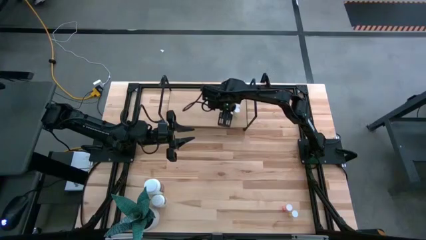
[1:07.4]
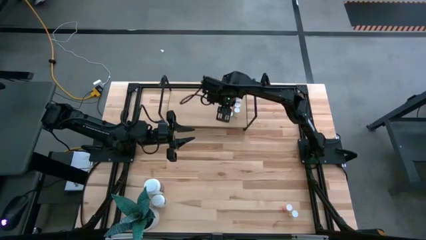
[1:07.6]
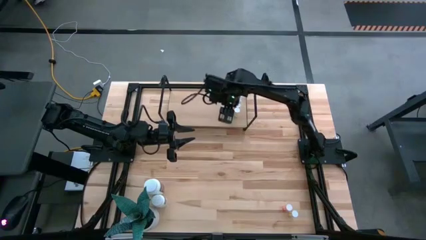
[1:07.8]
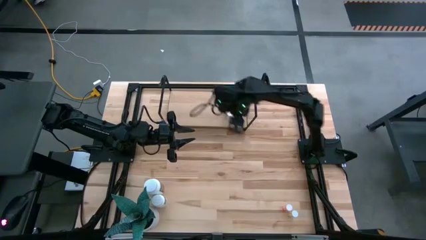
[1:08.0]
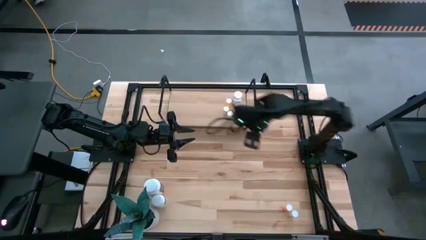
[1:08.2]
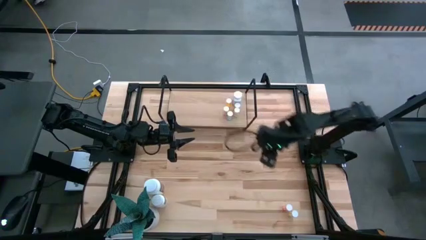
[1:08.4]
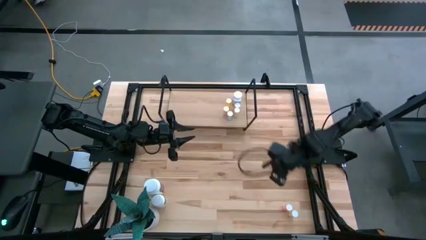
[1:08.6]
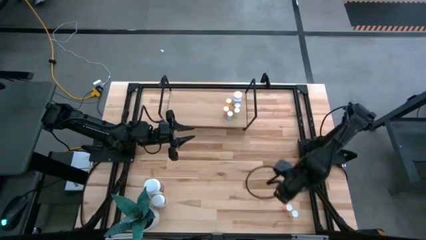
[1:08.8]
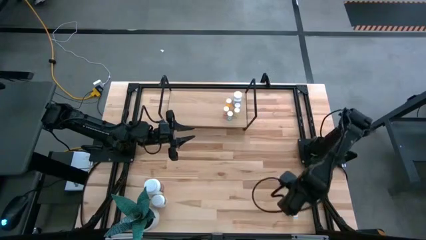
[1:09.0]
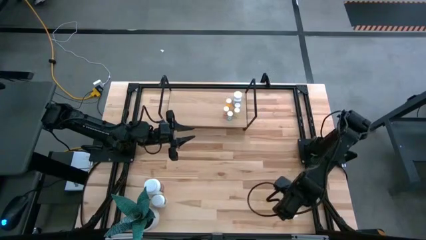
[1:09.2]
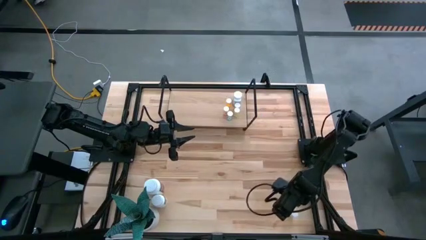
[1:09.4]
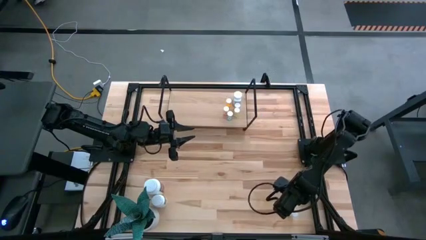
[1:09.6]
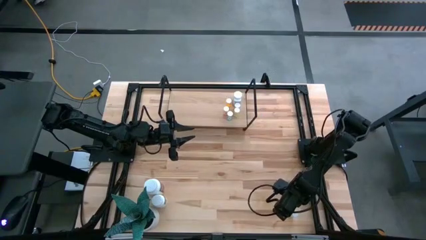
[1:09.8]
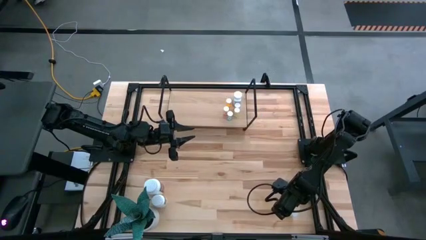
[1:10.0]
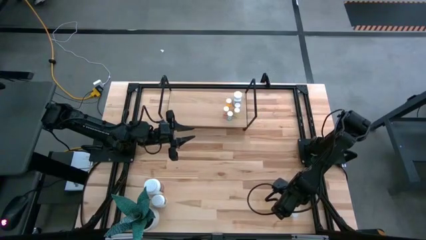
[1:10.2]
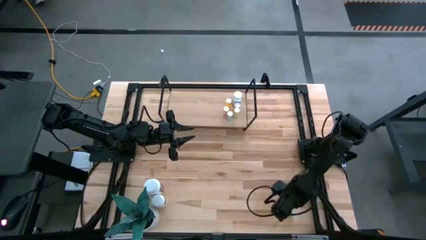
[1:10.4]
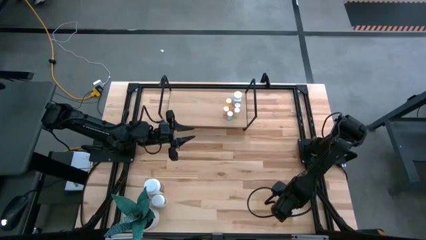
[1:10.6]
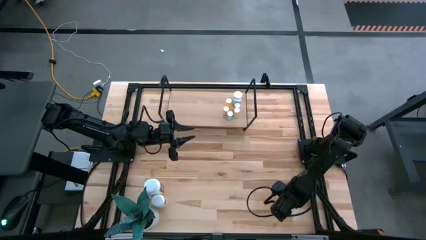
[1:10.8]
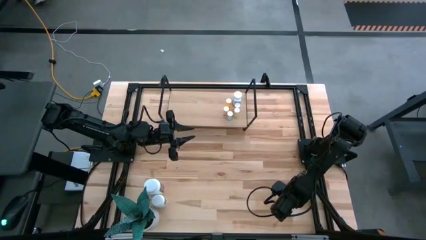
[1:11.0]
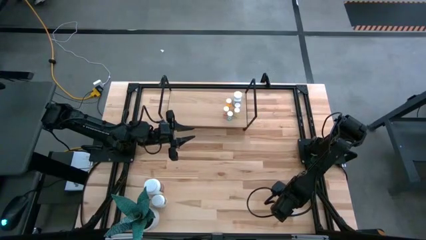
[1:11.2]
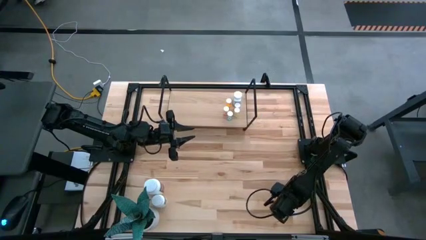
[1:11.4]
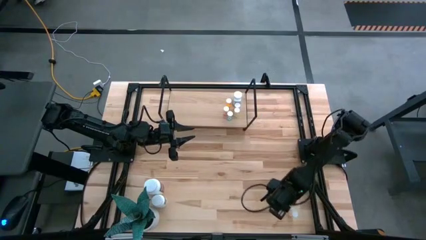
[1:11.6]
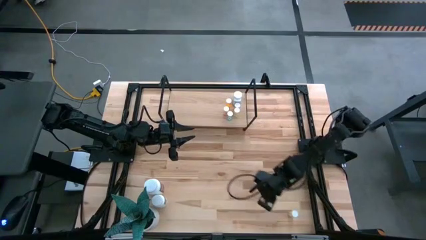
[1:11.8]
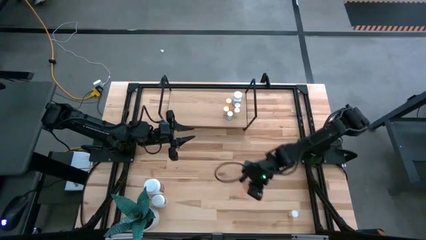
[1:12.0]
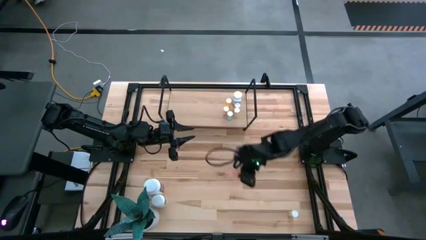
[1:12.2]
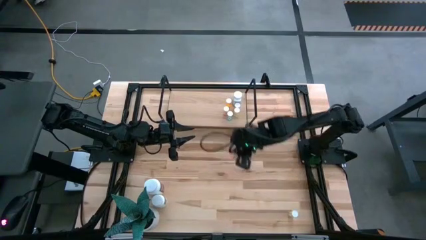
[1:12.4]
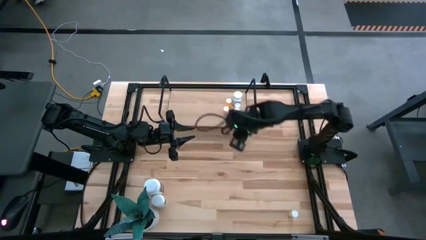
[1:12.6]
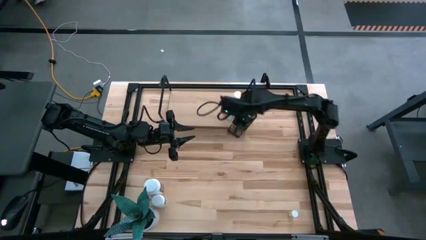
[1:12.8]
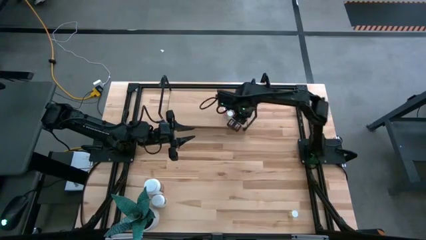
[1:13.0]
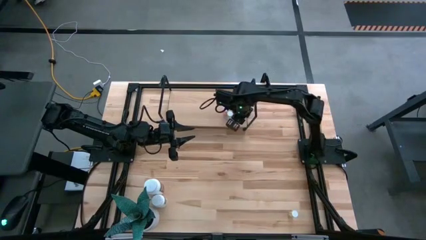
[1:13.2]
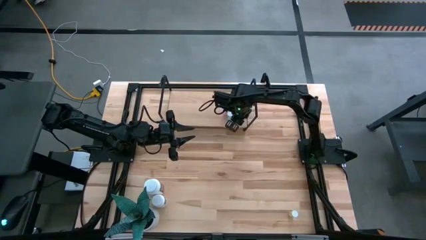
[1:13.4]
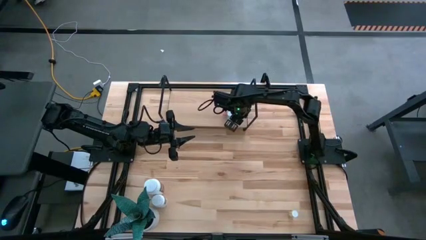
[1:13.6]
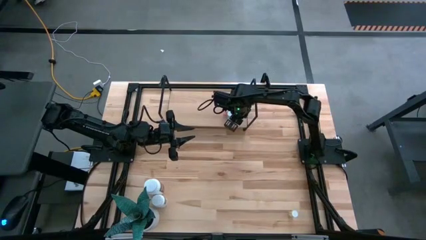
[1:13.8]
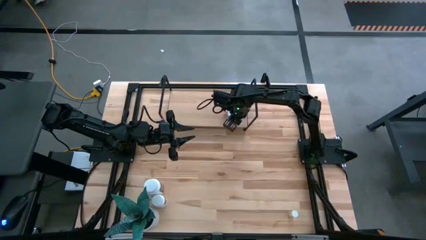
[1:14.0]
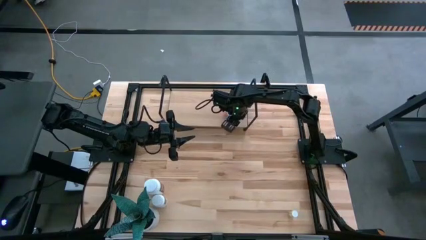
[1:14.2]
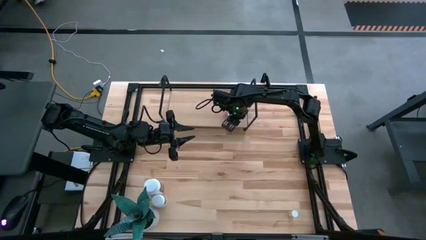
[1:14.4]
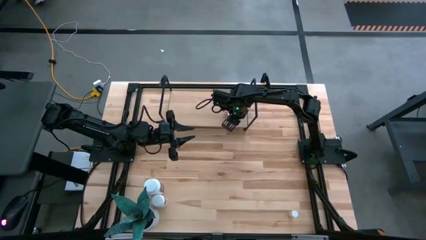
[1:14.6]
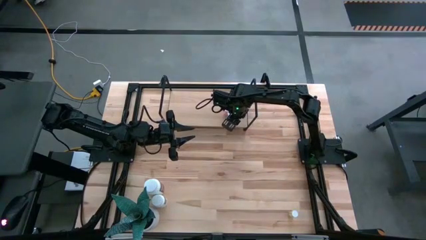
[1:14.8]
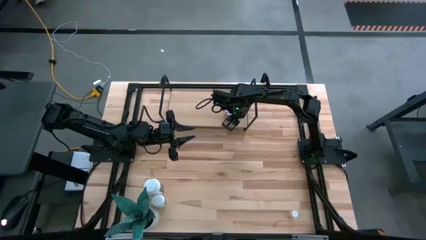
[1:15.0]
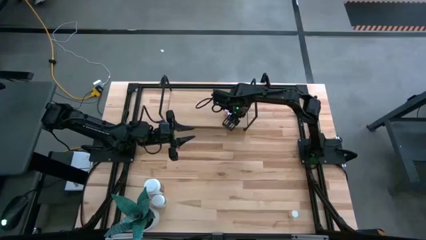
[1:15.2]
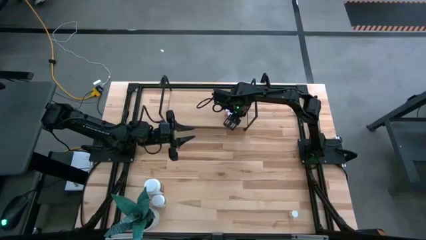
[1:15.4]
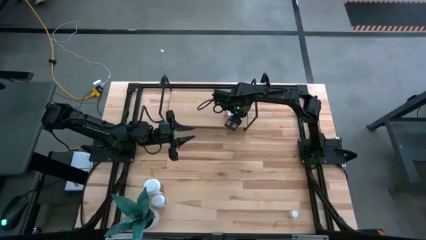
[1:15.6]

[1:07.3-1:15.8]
Task: Pick and place medicine bottles onto shelf by color
Put the pink pill bottle on the shelf

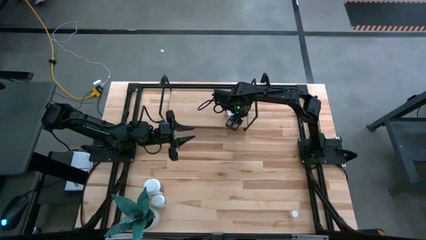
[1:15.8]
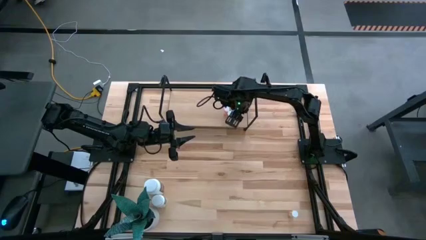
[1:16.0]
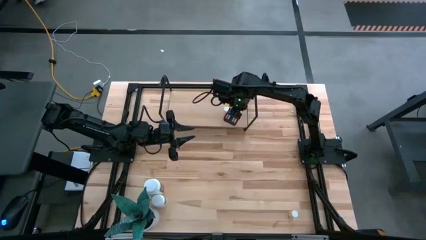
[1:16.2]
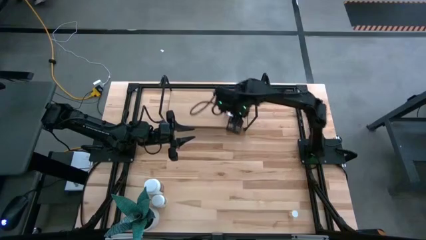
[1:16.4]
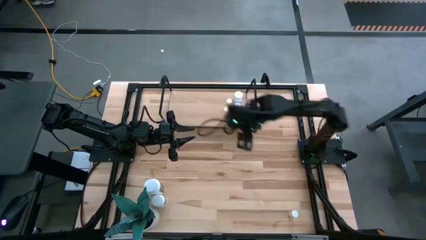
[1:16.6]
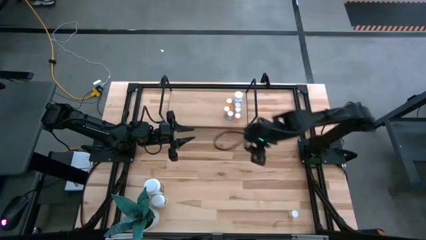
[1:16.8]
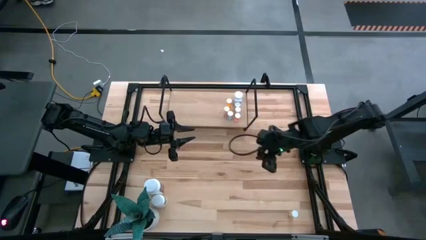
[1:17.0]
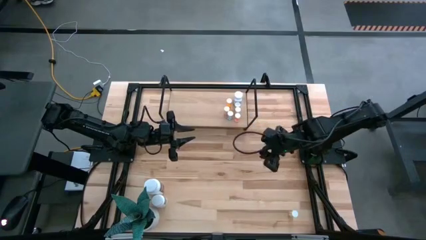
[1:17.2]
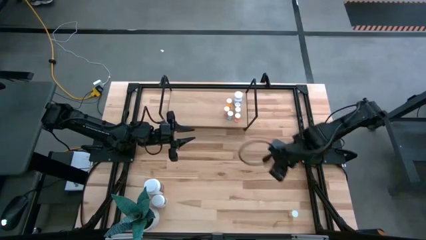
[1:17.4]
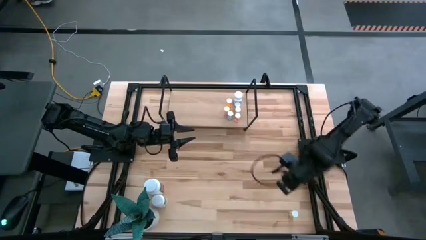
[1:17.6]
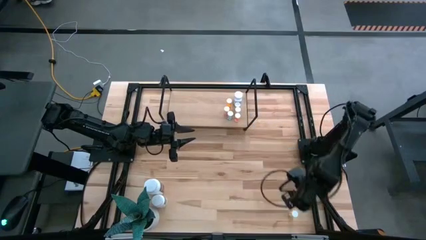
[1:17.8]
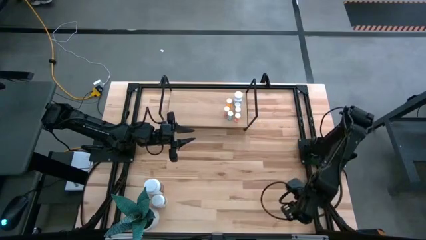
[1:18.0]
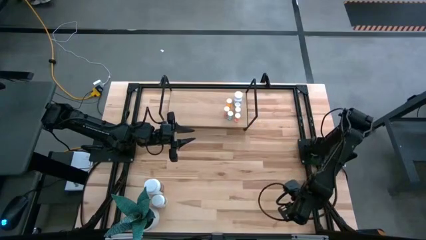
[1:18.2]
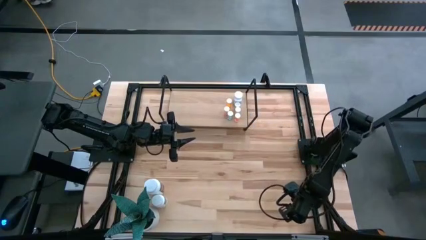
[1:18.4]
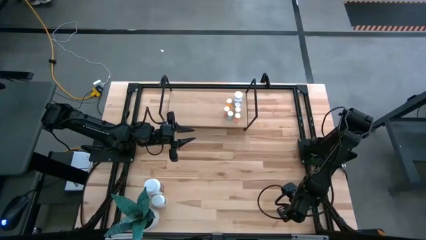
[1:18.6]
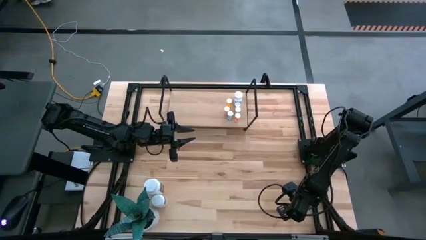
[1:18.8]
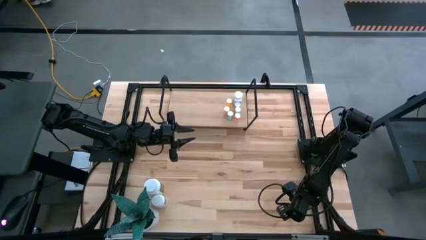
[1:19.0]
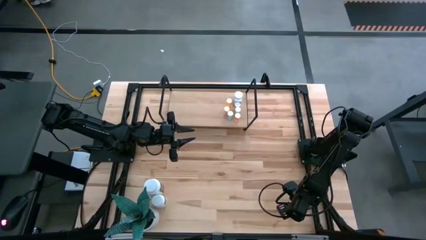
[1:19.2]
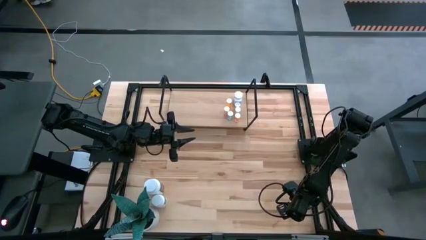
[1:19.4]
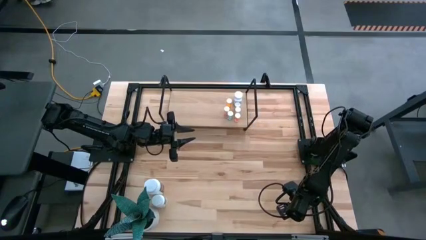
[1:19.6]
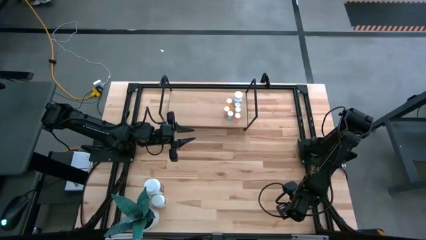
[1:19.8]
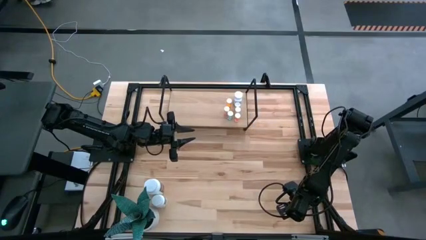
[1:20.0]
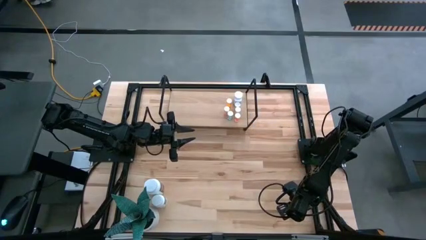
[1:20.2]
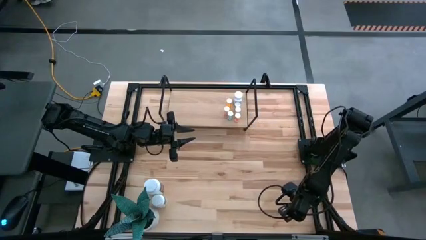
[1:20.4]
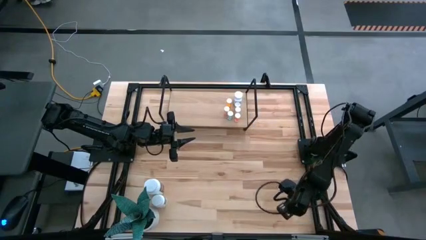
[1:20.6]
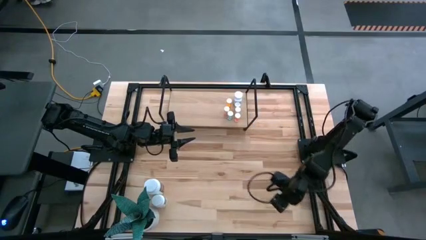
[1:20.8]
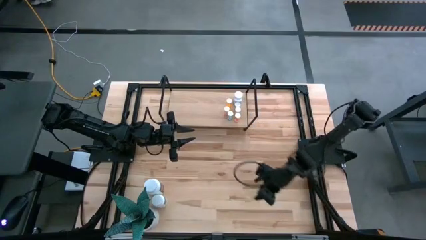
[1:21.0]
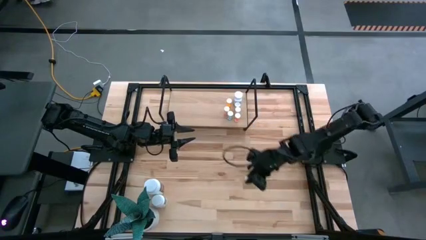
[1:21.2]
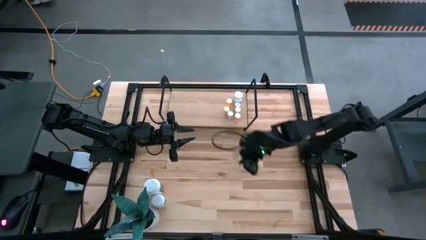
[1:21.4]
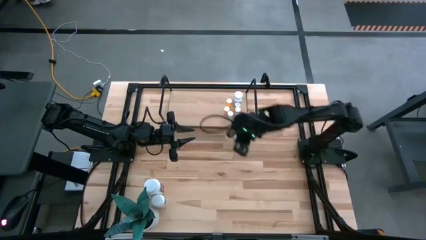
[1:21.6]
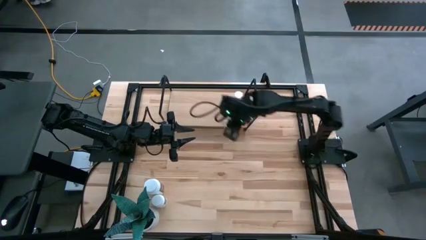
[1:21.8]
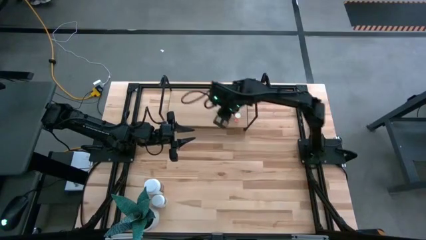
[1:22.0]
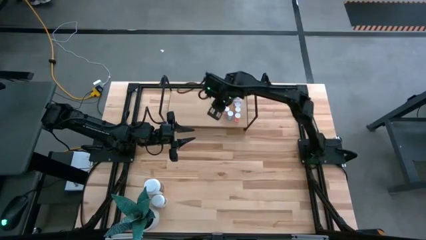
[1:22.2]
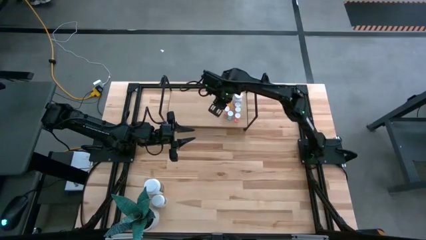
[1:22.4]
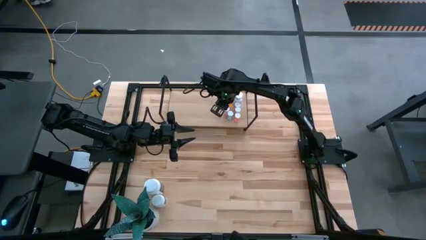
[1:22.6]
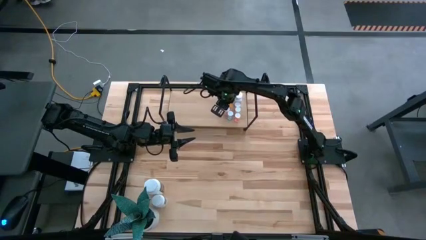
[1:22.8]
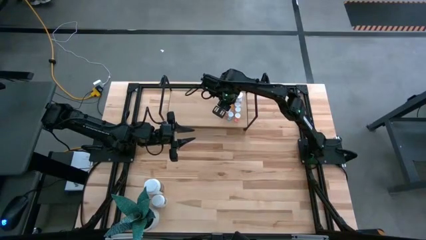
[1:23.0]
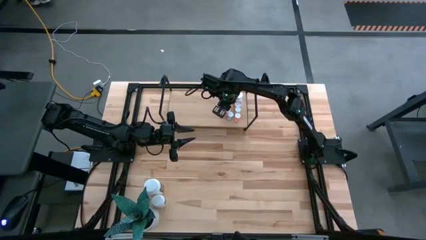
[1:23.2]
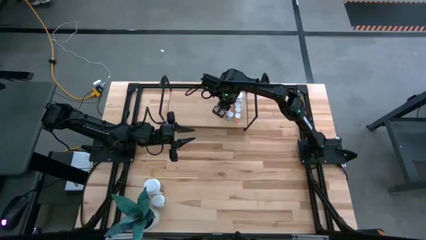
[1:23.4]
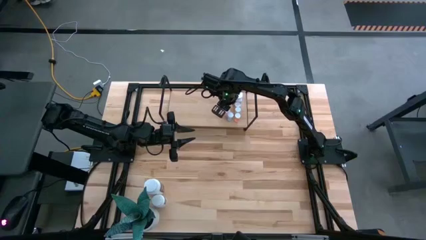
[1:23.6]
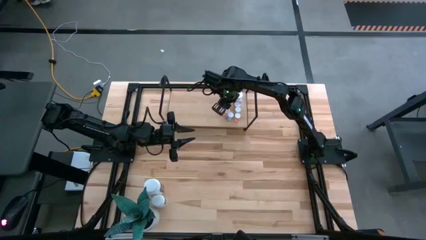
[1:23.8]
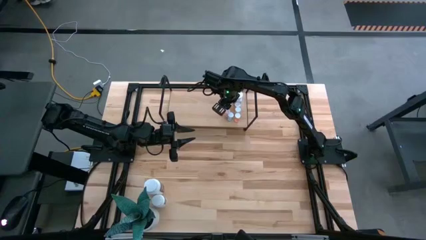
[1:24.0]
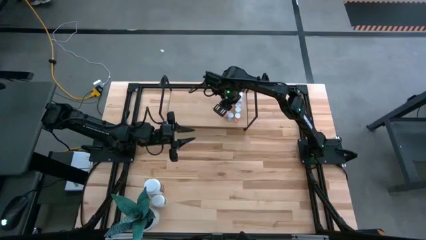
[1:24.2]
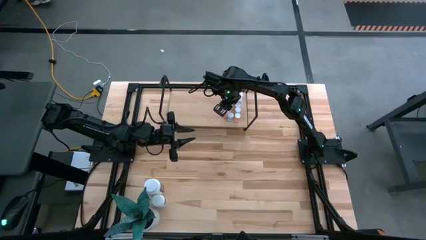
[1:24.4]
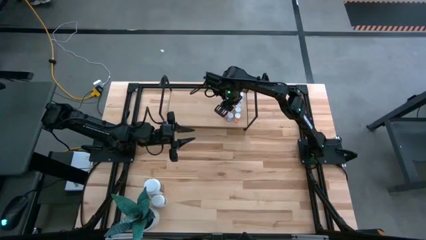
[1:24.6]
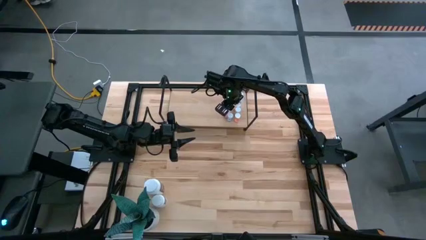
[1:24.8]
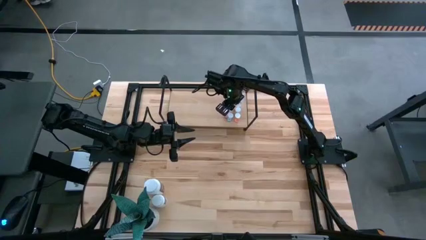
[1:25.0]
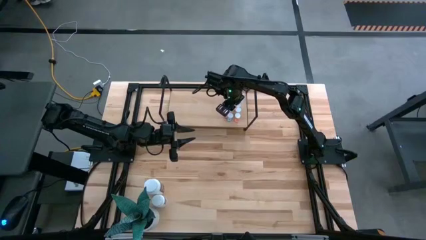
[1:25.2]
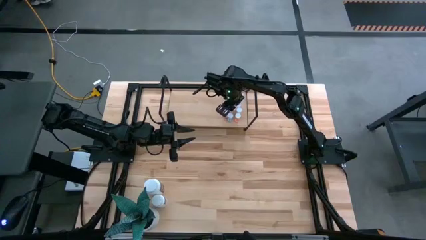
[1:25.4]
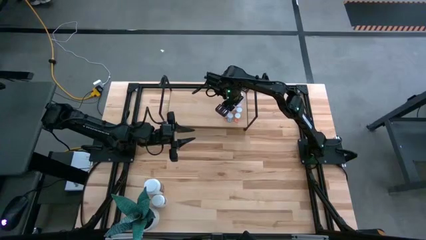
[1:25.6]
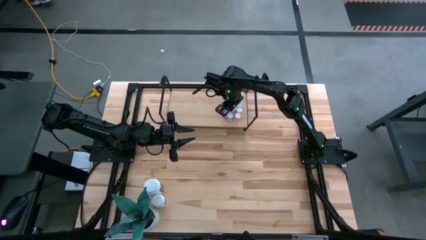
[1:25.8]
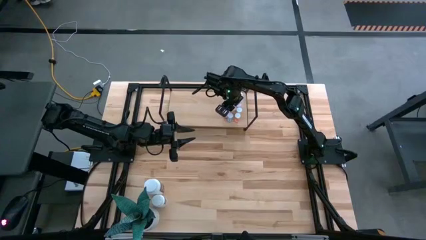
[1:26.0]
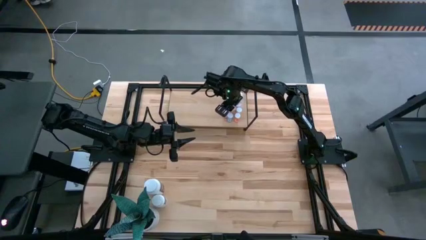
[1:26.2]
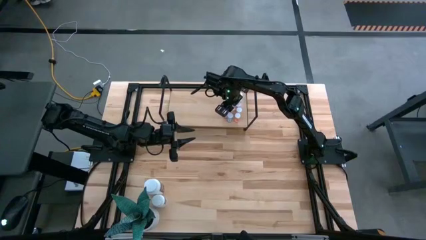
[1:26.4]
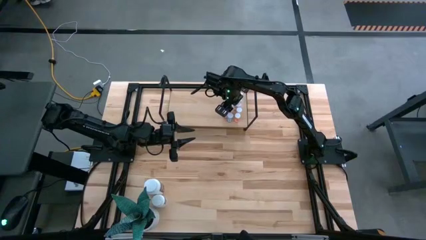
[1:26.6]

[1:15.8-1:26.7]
Put the yellow pill bottle on the shelf
